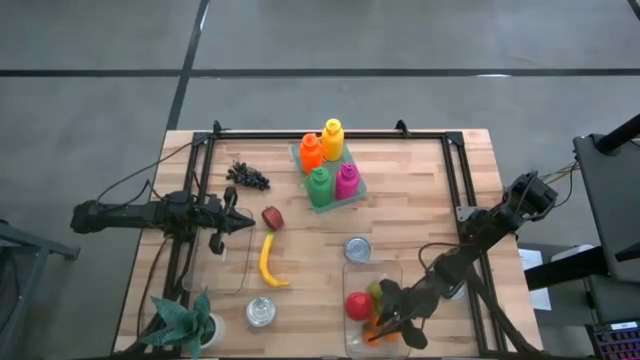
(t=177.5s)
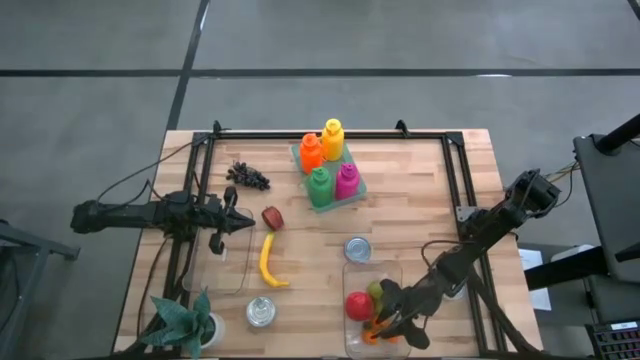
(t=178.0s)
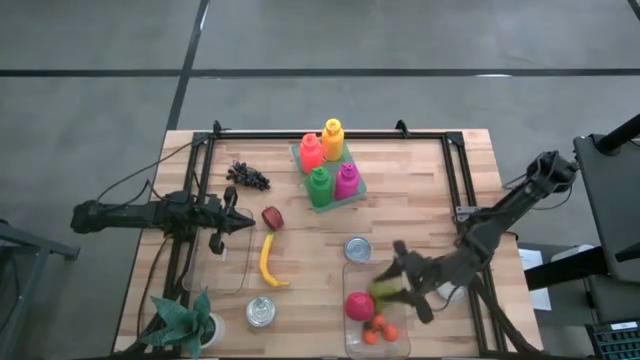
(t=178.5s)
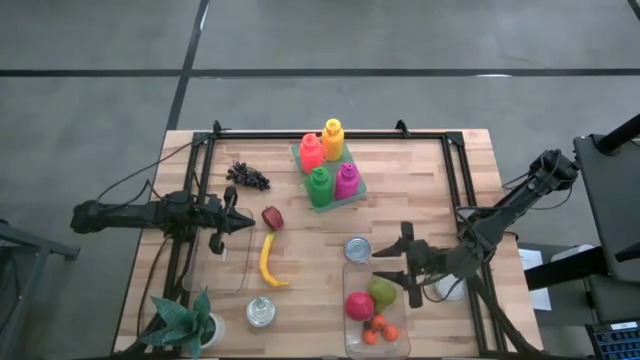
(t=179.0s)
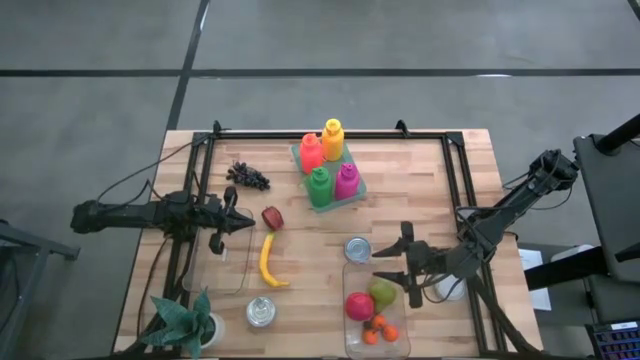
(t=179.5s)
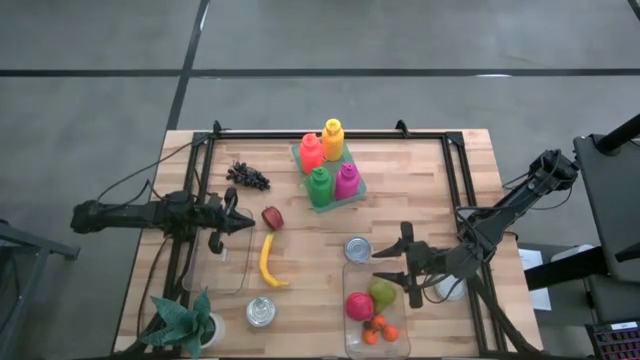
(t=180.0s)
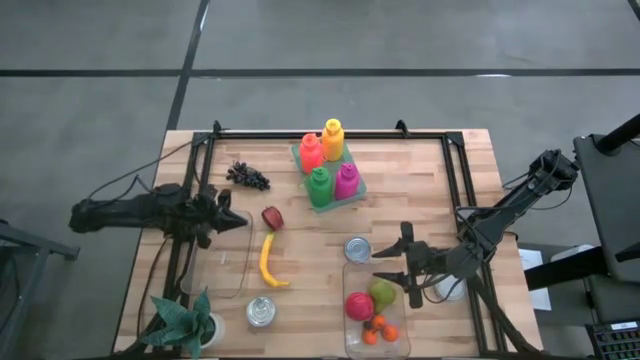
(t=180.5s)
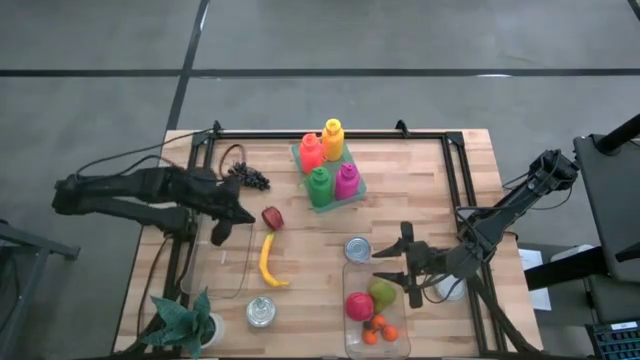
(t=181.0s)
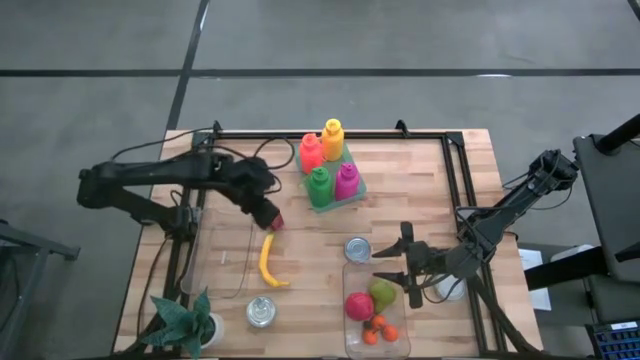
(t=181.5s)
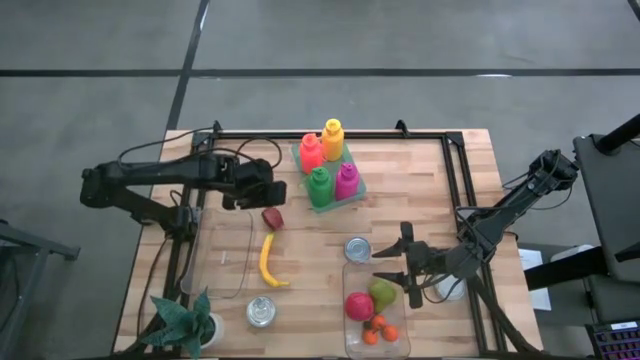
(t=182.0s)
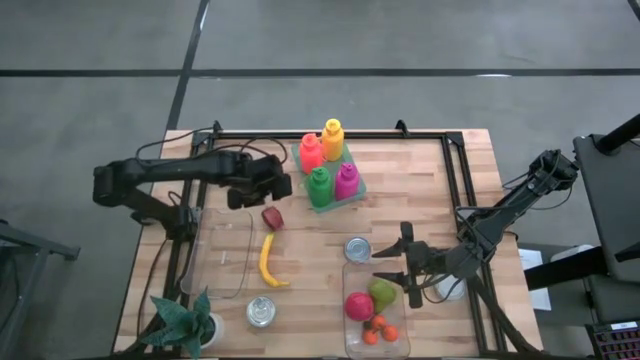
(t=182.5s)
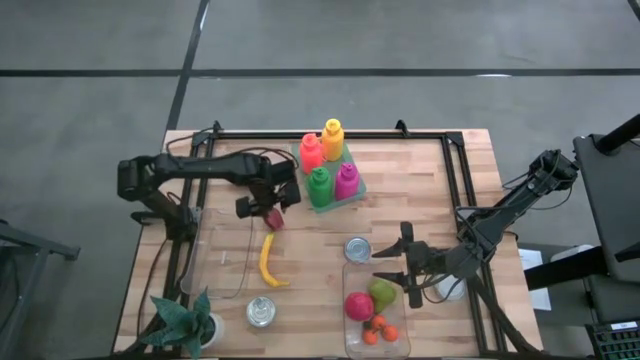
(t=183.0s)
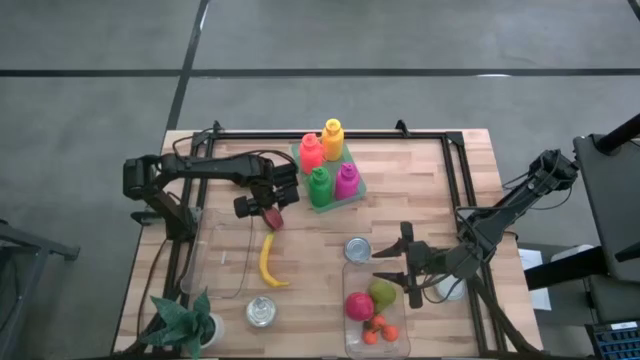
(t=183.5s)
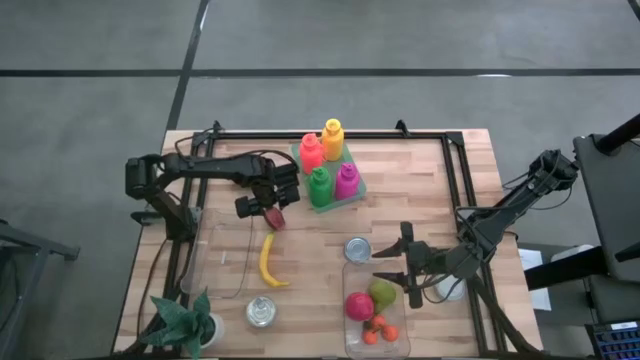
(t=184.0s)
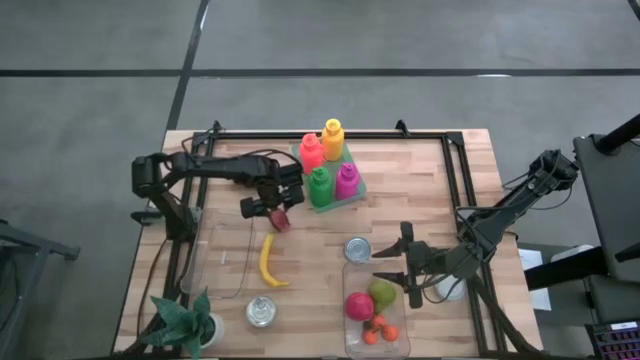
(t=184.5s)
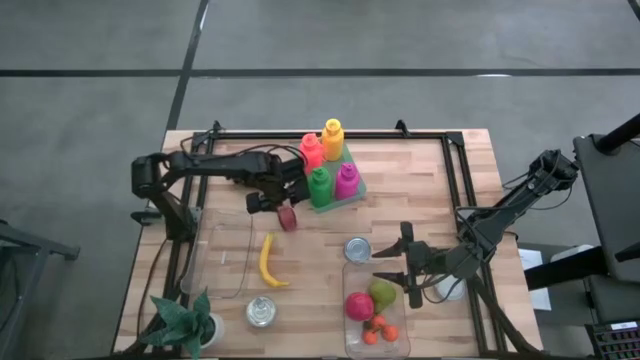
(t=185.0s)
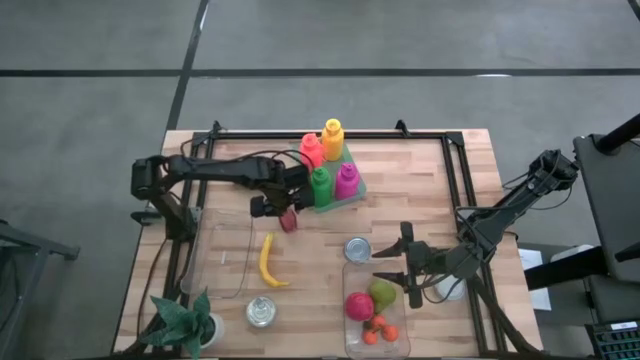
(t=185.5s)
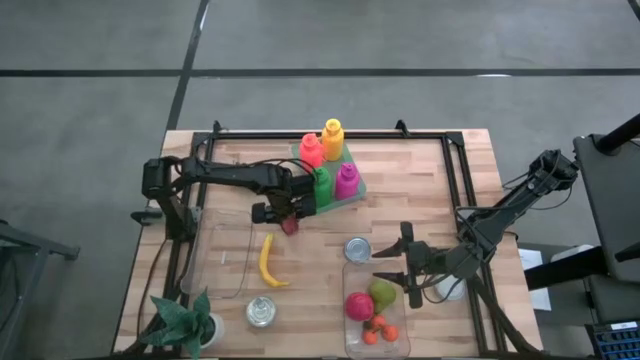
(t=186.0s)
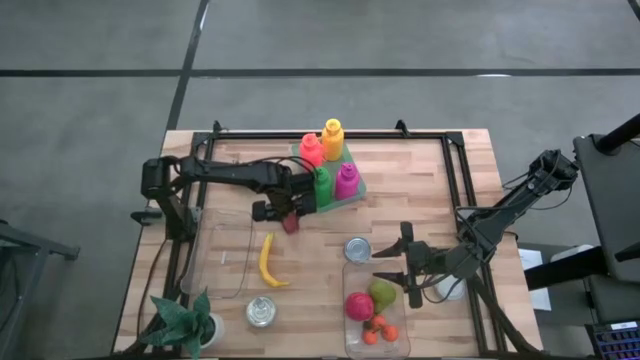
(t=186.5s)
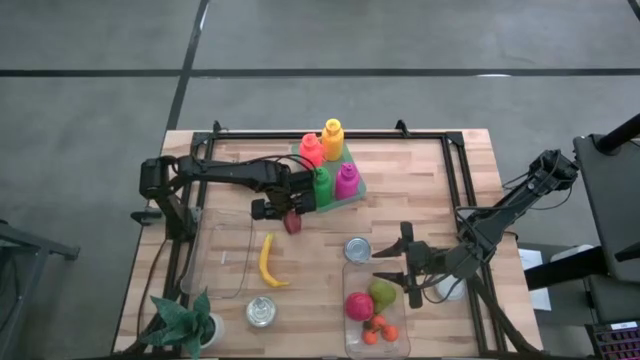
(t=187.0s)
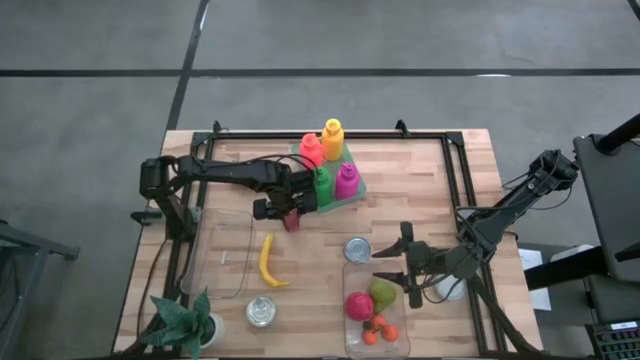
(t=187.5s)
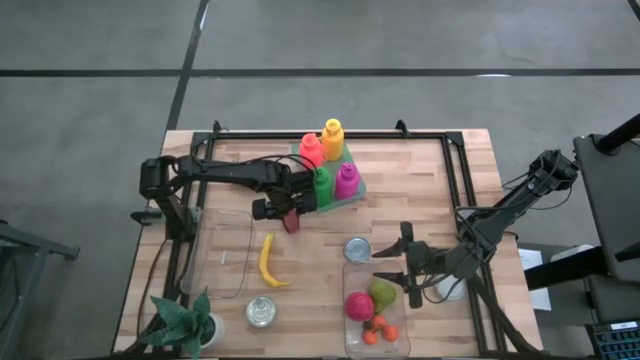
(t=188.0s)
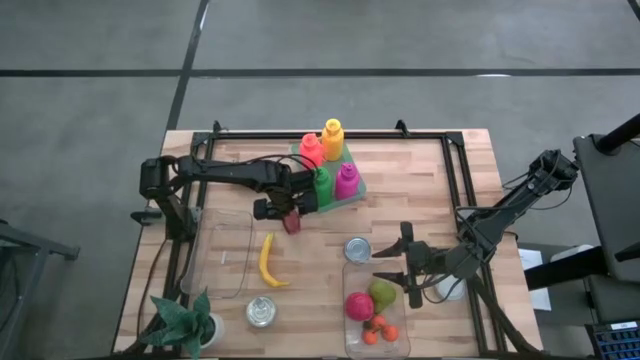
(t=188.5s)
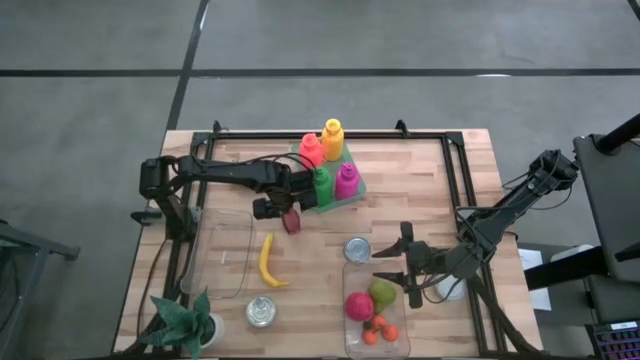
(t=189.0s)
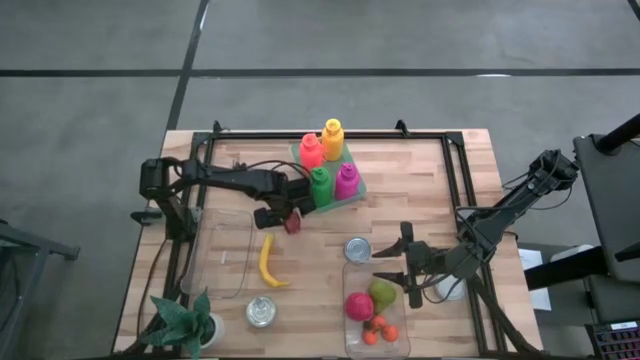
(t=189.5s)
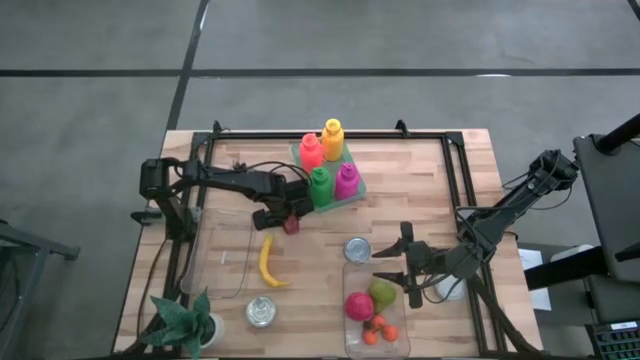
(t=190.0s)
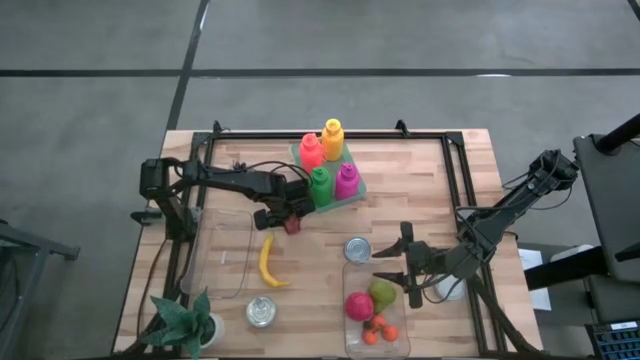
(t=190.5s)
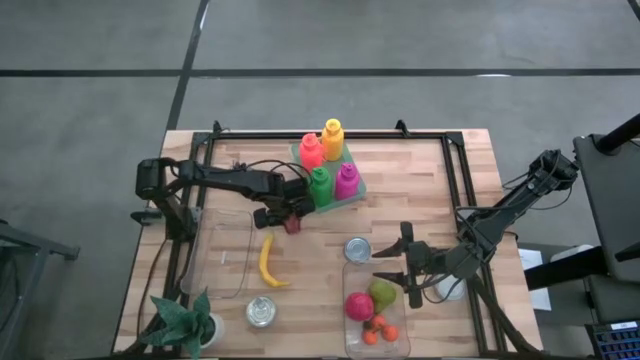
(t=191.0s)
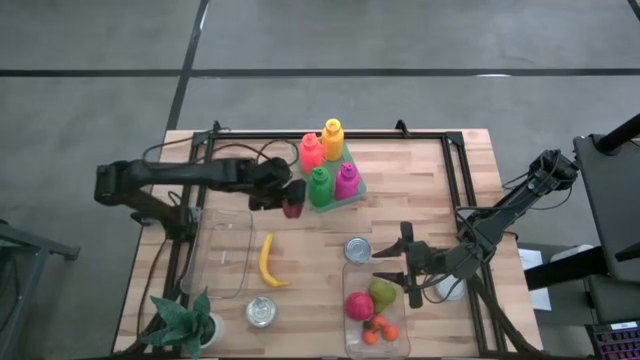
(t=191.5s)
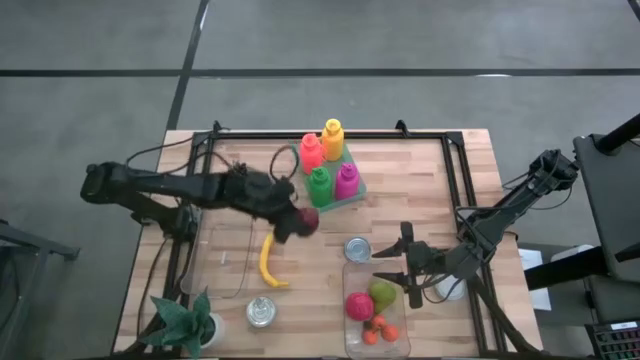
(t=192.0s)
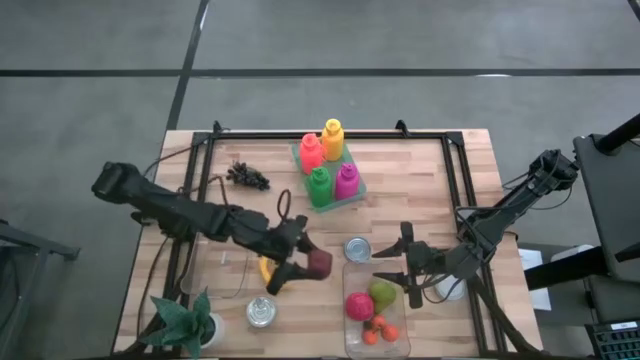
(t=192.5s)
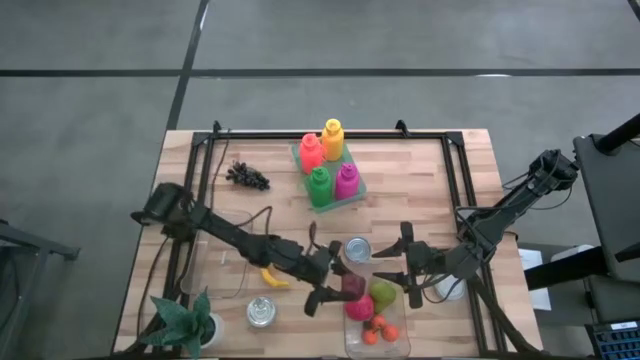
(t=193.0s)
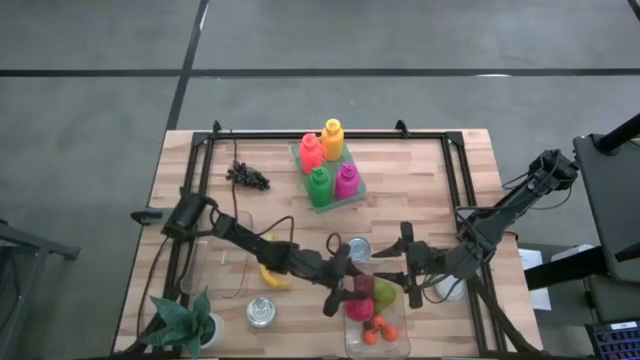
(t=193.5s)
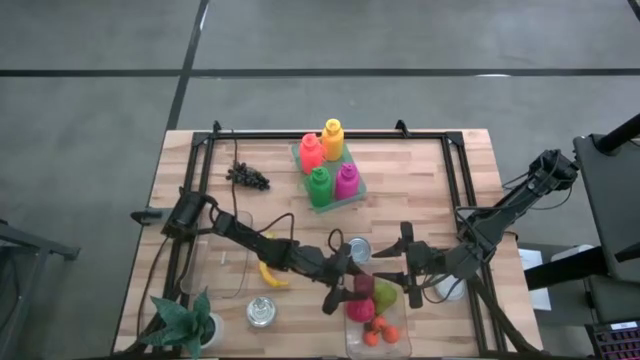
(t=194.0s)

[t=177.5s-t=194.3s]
Task: Pick & Place Food Item
Put the light red apple into the bottom transparent bin

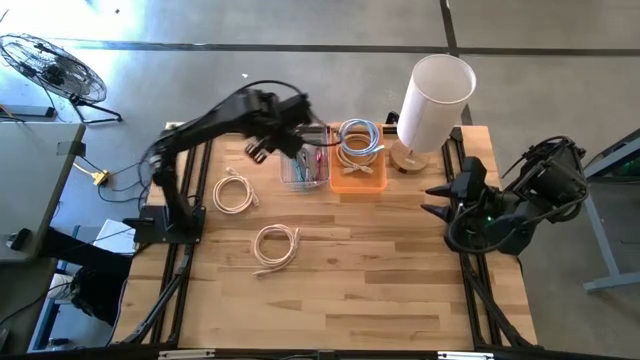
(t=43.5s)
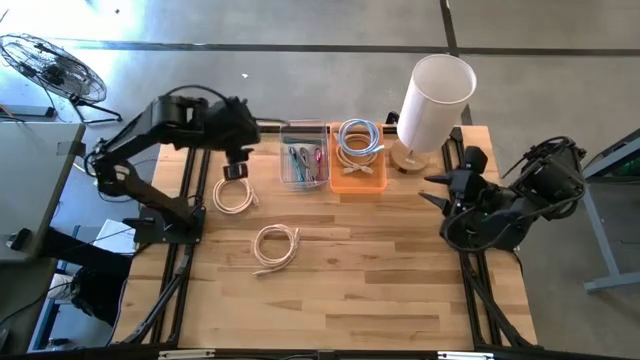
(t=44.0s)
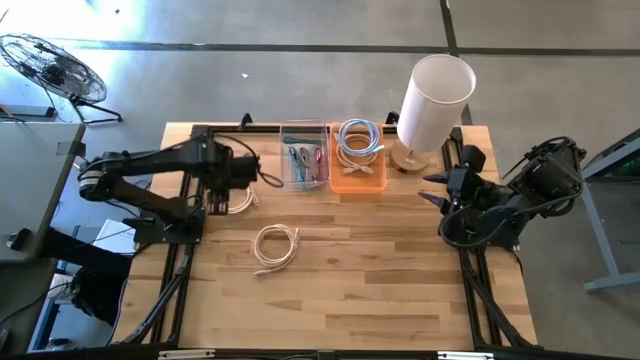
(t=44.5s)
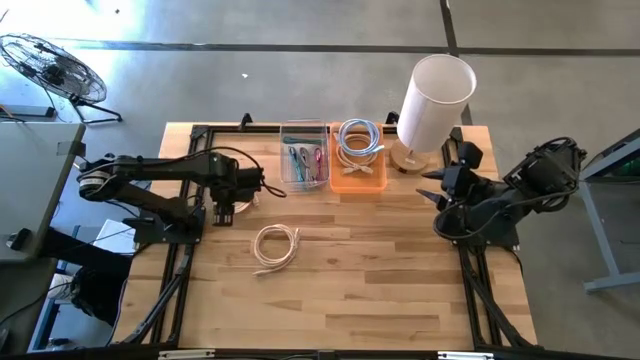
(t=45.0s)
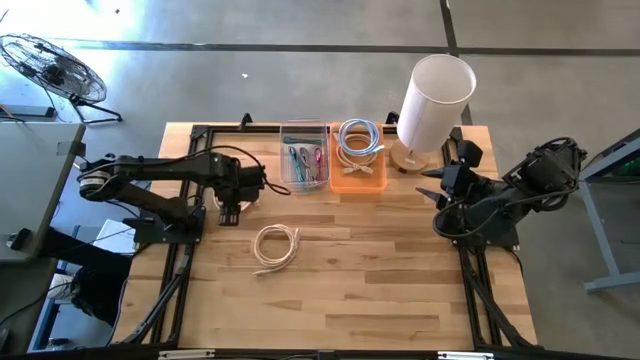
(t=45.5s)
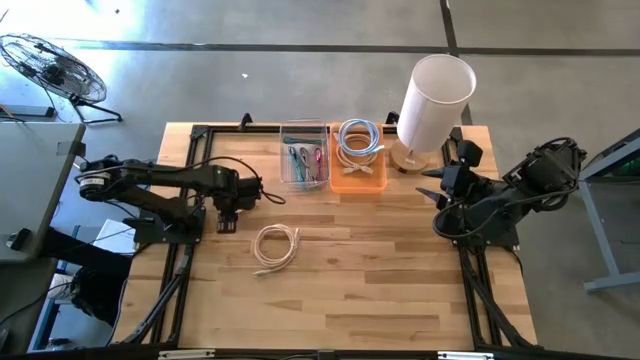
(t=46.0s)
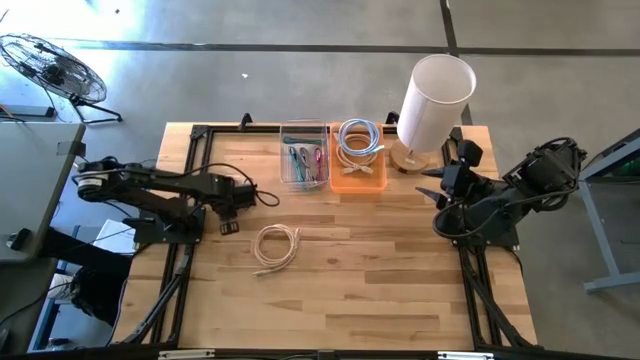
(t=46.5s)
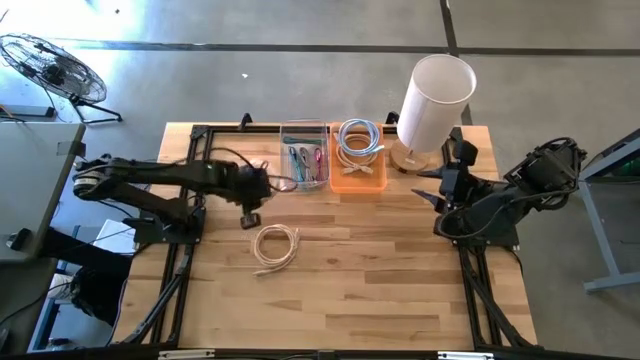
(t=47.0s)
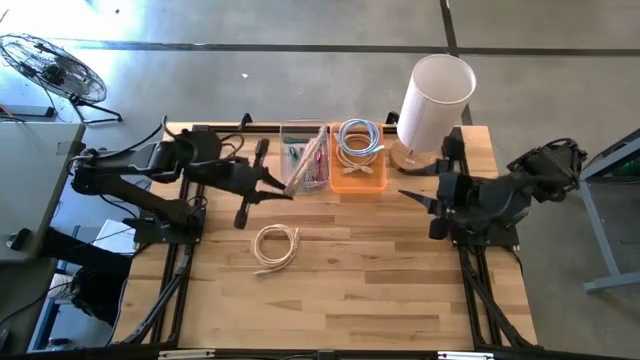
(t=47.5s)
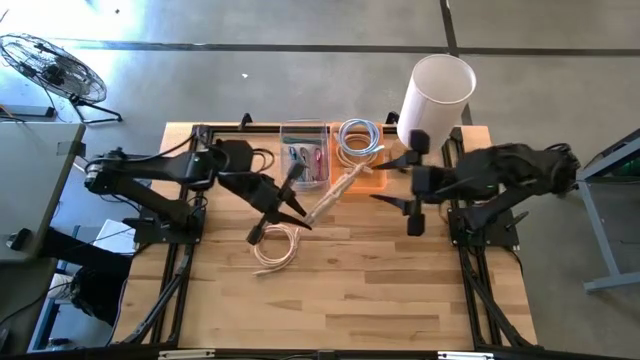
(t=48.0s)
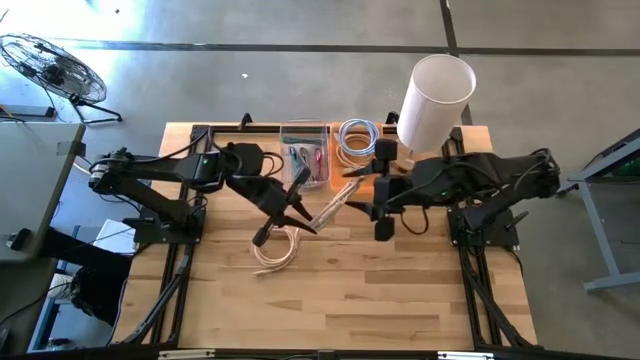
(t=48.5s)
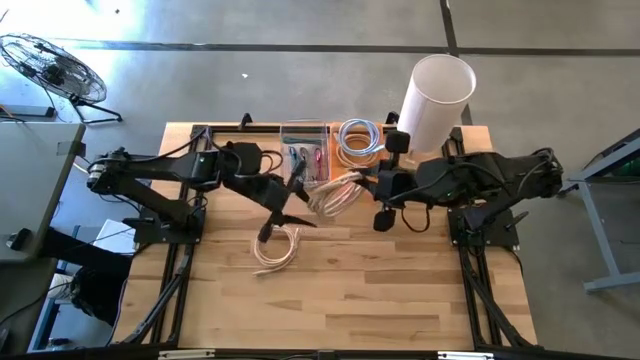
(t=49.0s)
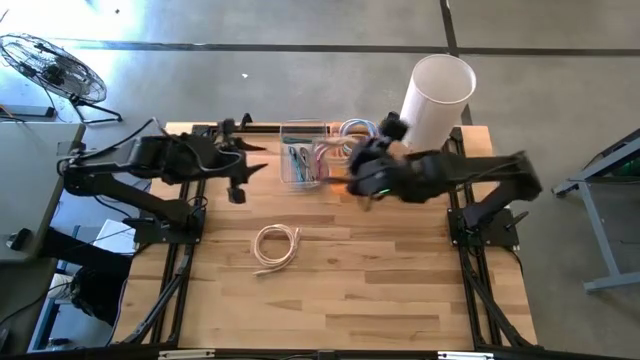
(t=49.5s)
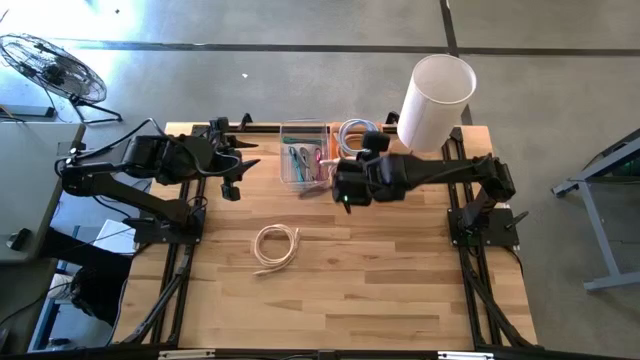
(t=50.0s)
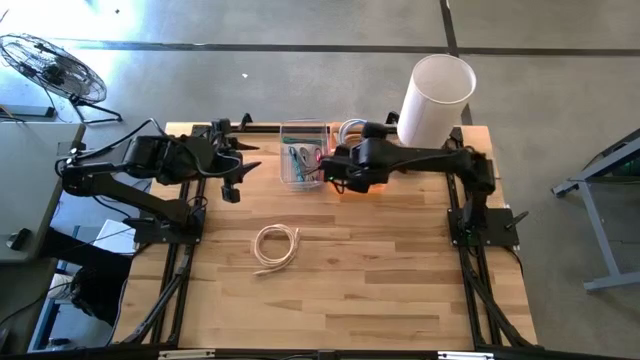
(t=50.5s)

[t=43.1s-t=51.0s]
Task: Pick & Place USB Port
Put the top light brown hdmi cable into the orange bin
